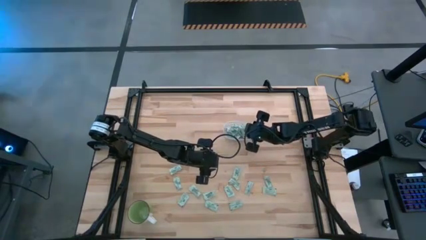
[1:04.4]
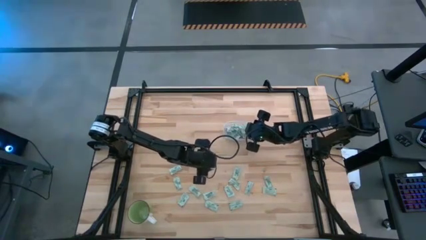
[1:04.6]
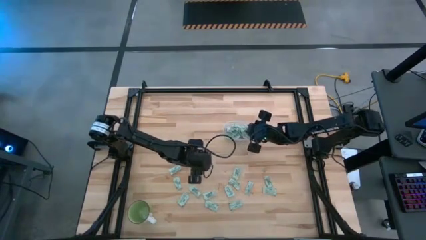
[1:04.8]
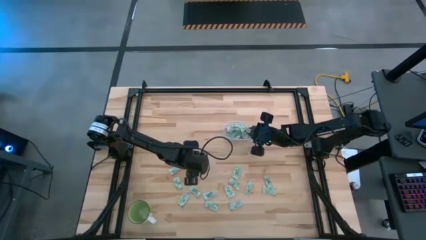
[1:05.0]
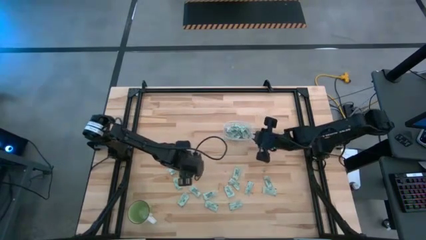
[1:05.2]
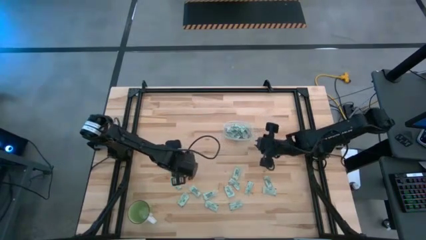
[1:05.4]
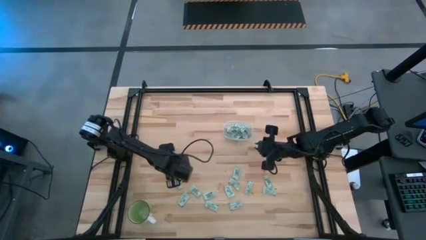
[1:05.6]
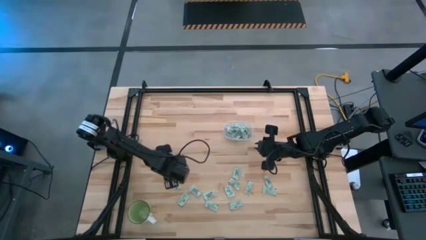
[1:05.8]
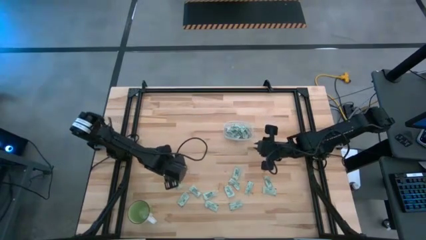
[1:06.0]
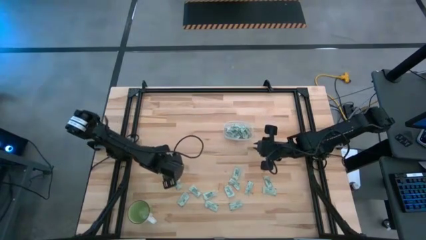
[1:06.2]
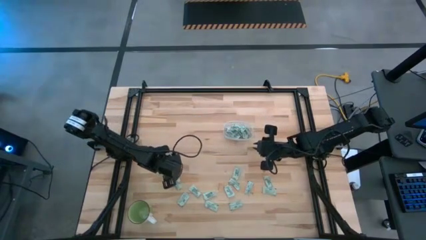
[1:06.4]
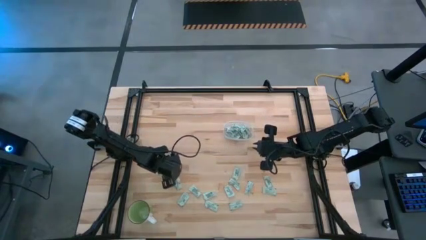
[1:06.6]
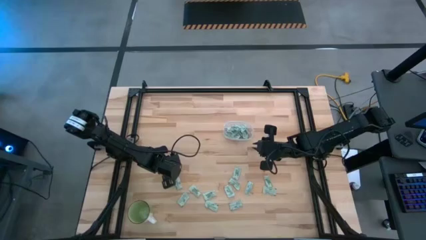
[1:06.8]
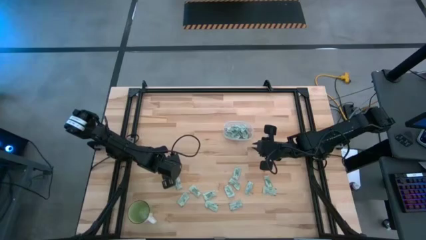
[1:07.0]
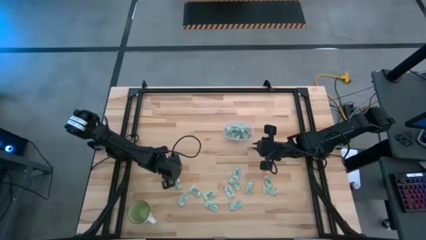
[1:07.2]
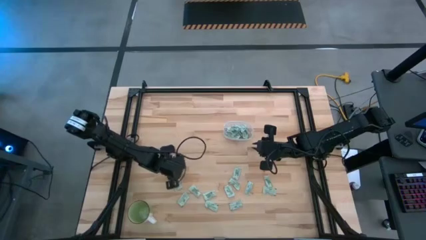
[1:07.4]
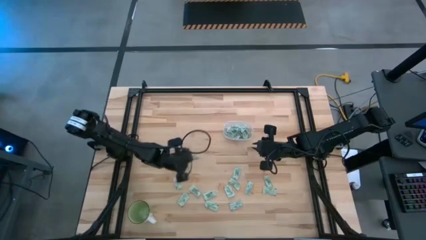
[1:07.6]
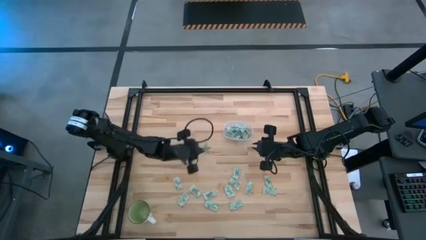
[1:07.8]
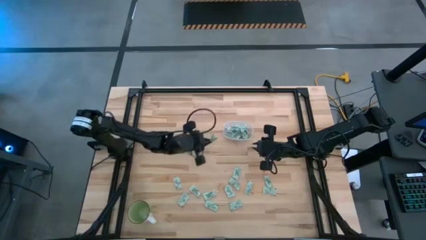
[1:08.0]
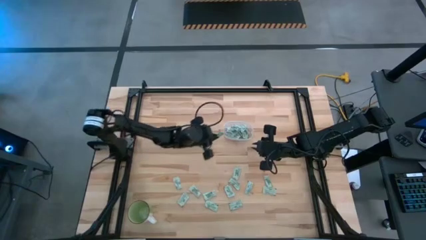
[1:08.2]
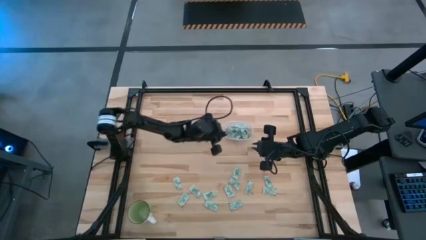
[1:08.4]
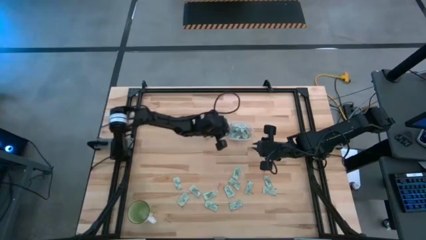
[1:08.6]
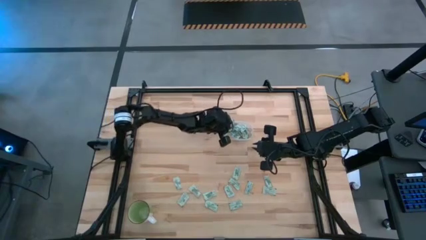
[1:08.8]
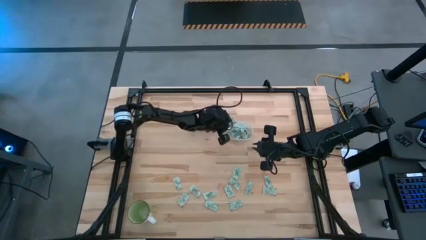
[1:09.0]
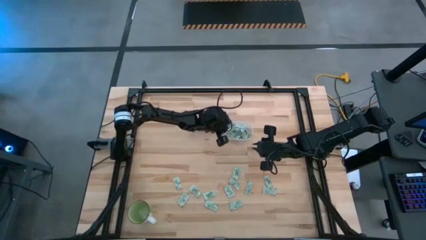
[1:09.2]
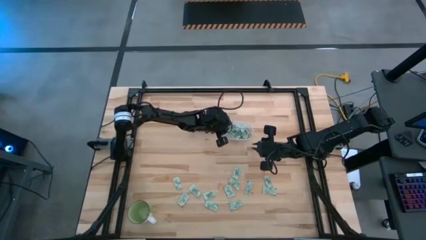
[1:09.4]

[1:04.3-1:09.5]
Task: Pick and place Stevia / Truvia into bins
Put the stevia packet into the transparent bin

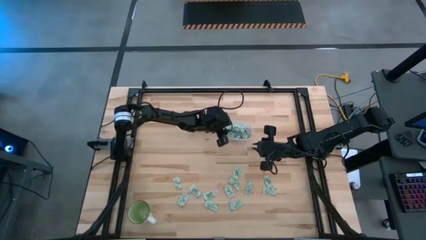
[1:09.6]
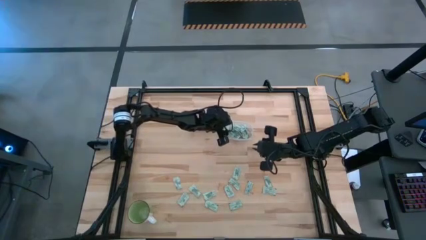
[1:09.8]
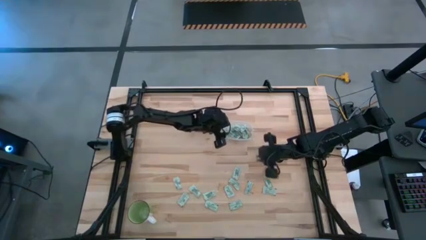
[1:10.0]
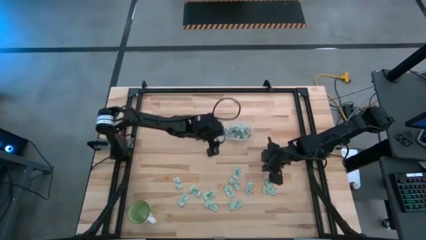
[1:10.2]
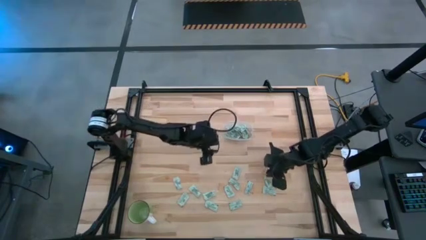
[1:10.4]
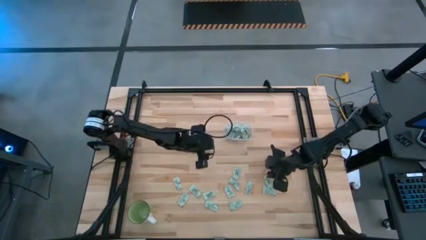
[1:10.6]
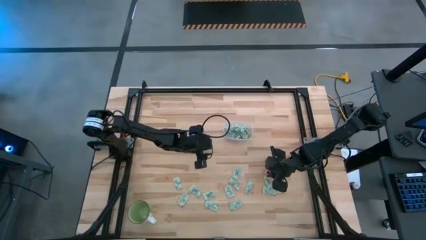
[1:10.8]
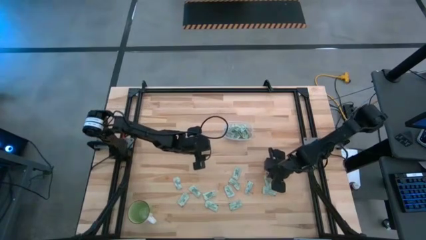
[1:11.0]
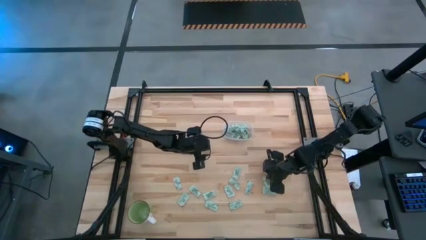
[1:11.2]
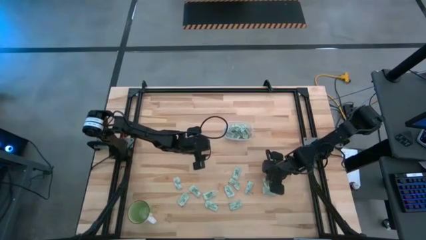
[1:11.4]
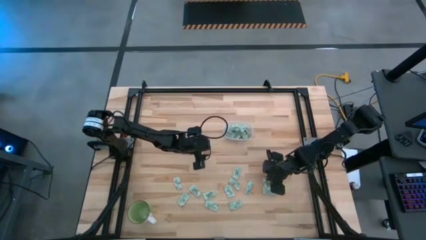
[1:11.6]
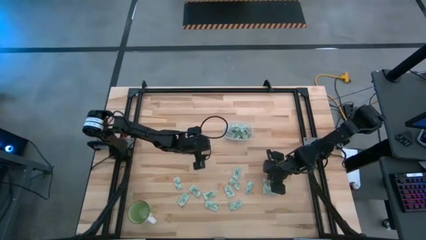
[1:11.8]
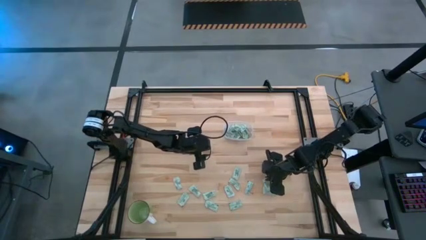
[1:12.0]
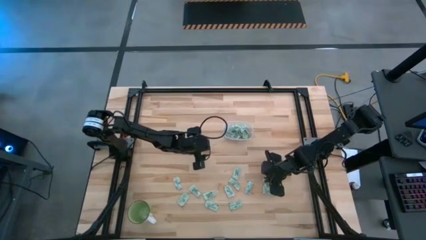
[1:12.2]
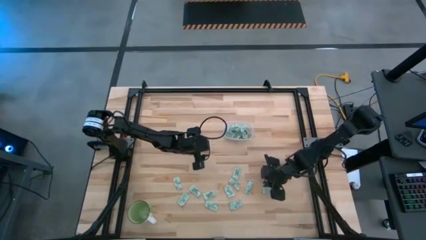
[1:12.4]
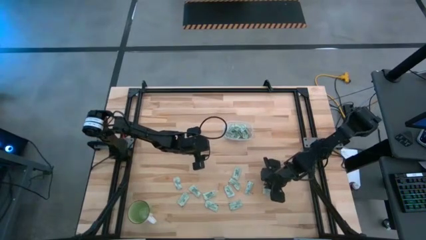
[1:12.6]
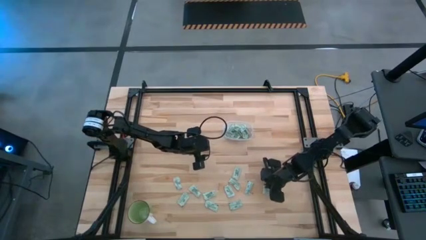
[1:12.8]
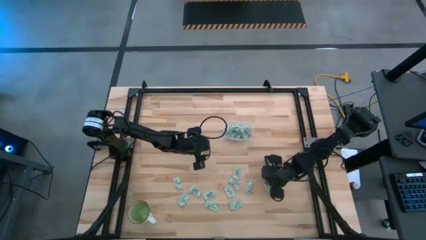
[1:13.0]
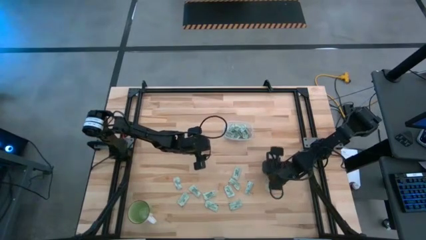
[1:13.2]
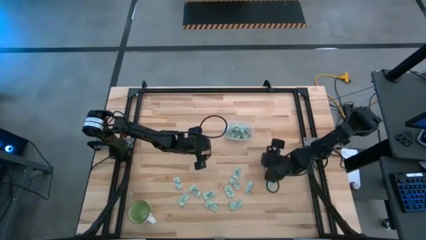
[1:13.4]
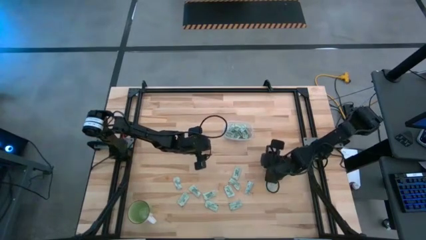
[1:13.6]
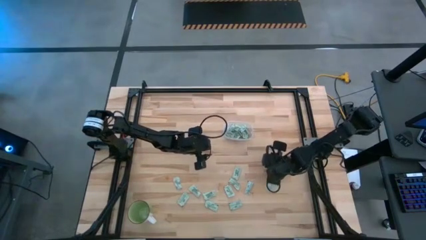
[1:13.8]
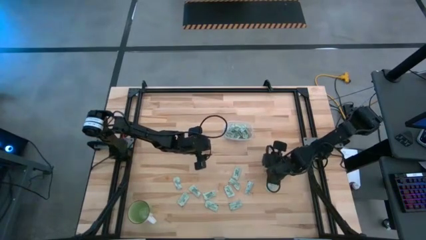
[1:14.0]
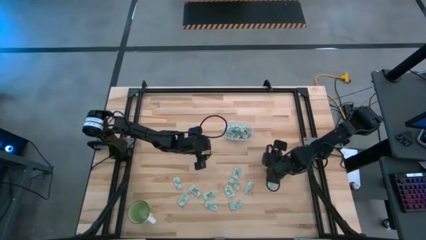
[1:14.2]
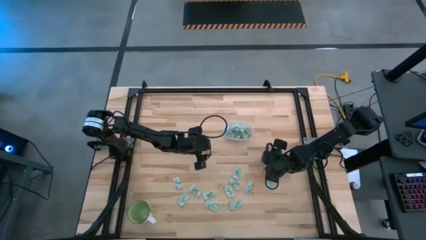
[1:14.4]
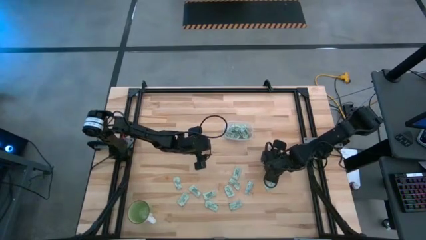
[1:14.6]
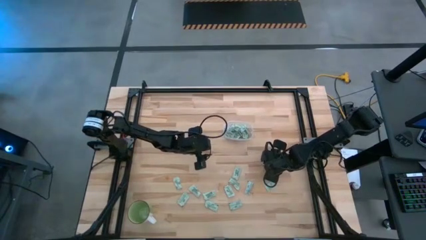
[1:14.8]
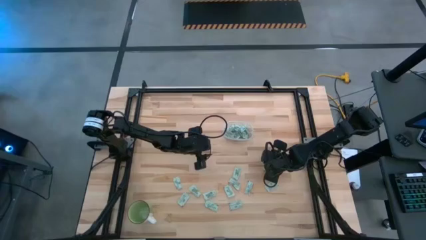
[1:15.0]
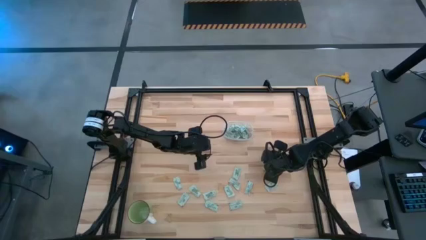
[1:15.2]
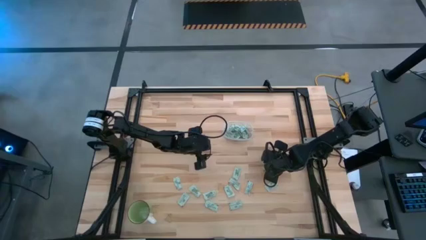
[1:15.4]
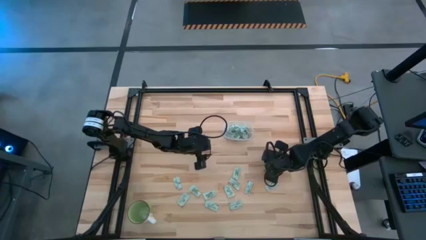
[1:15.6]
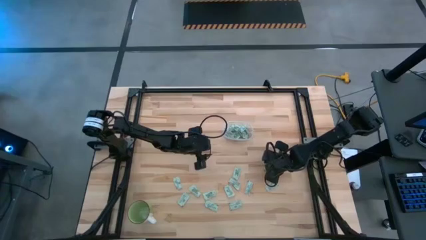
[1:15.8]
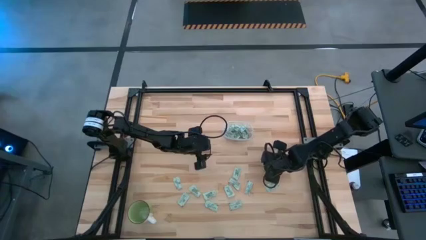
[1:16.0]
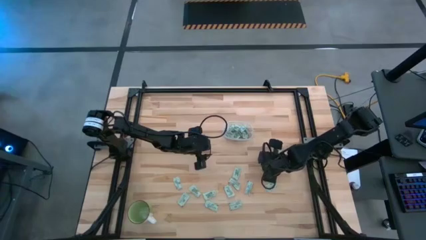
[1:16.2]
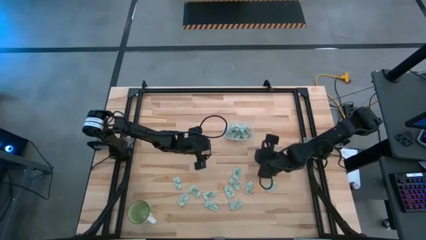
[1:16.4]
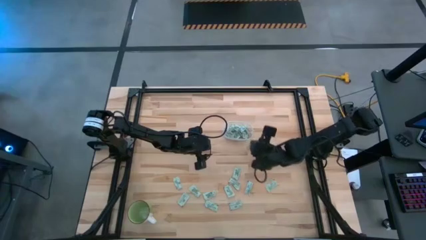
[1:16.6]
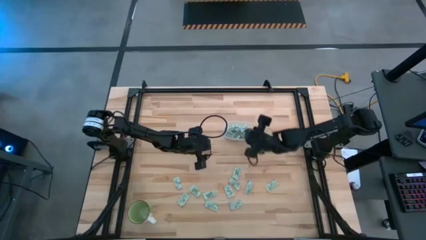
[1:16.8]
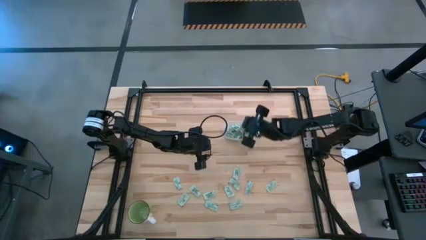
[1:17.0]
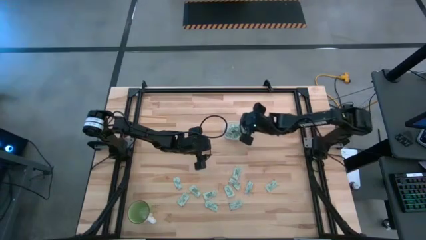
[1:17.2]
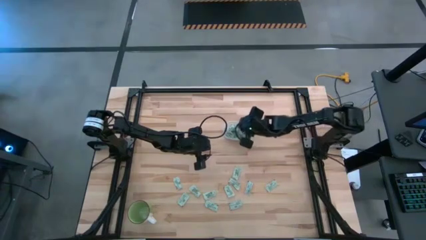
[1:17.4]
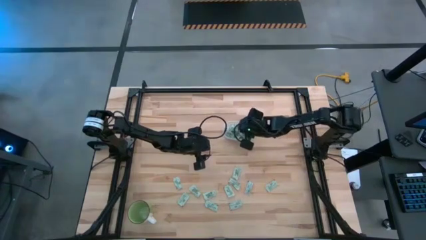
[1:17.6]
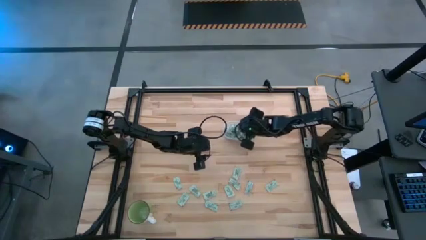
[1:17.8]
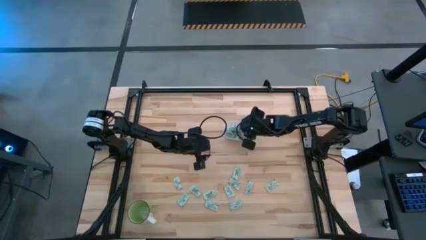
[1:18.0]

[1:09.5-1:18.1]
Put the stevia packet into the transparent bin

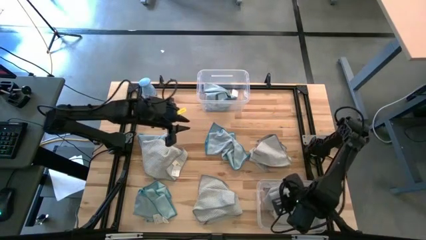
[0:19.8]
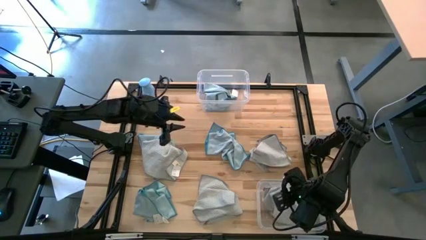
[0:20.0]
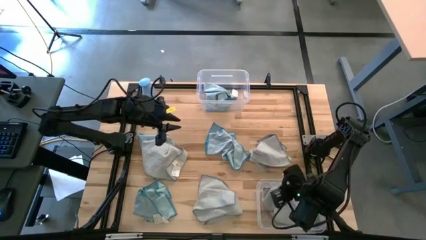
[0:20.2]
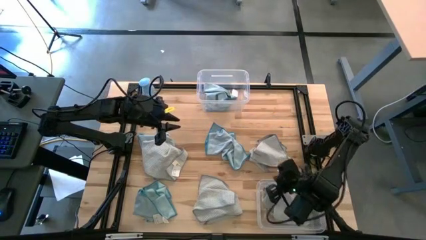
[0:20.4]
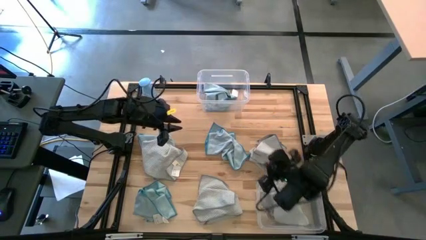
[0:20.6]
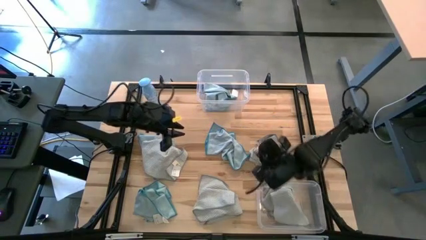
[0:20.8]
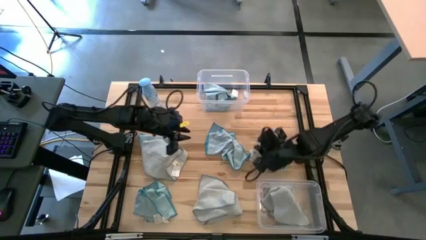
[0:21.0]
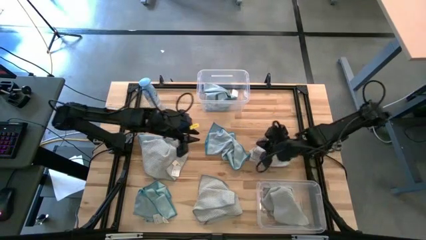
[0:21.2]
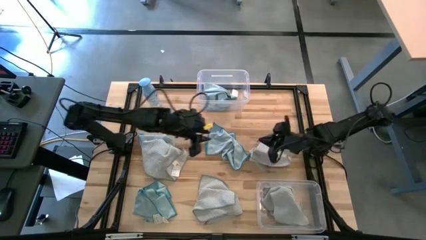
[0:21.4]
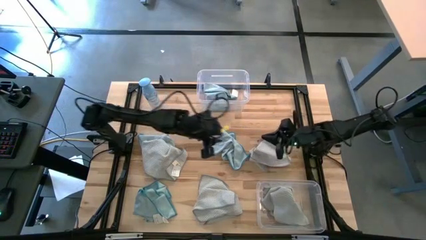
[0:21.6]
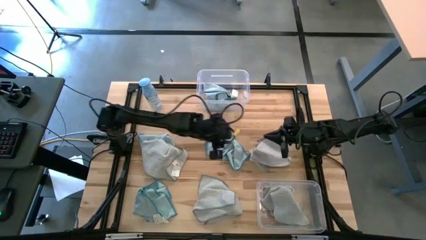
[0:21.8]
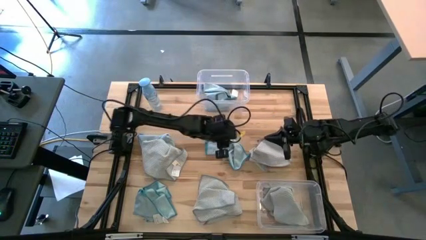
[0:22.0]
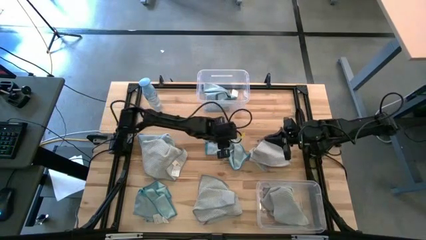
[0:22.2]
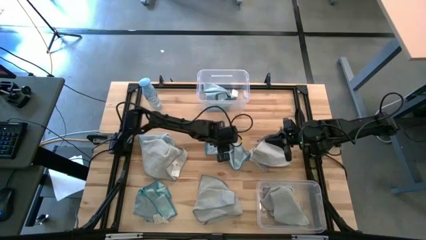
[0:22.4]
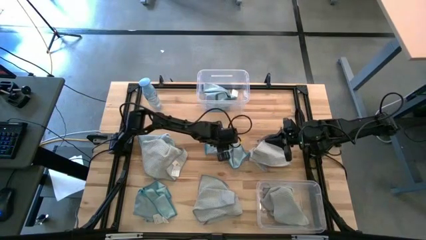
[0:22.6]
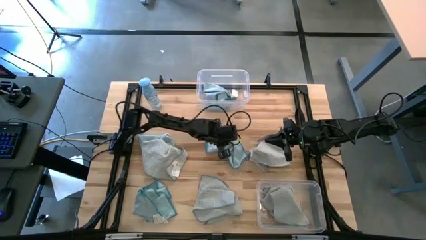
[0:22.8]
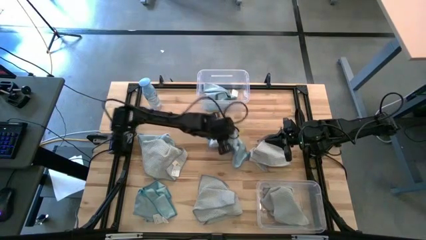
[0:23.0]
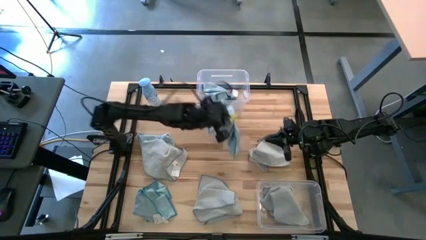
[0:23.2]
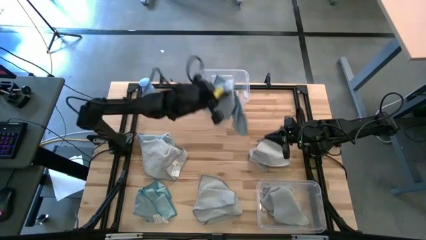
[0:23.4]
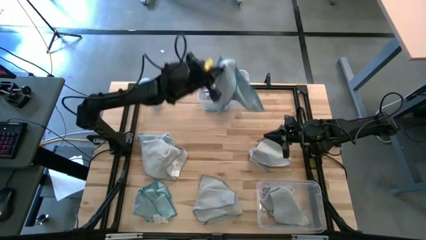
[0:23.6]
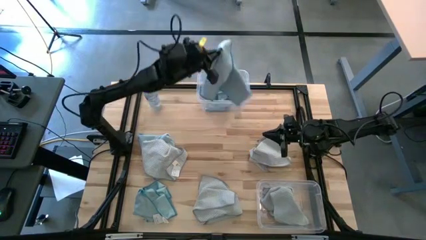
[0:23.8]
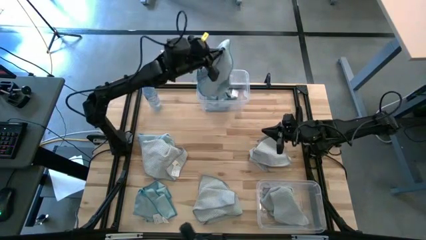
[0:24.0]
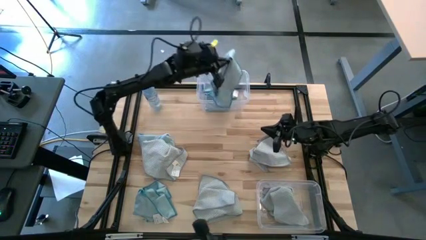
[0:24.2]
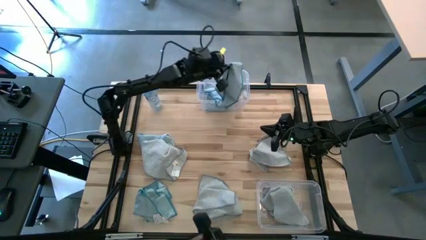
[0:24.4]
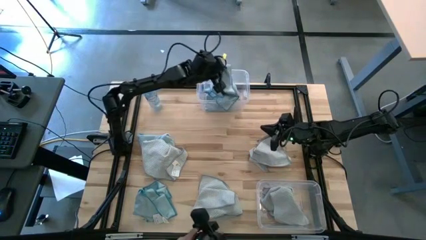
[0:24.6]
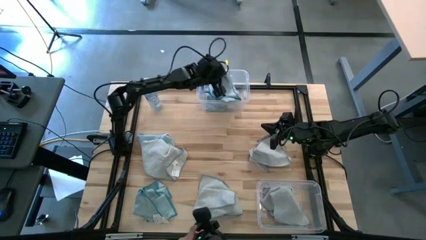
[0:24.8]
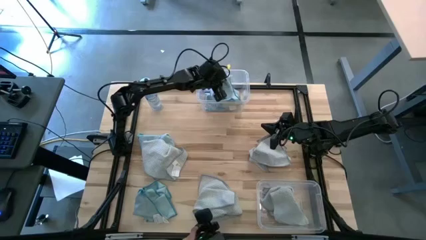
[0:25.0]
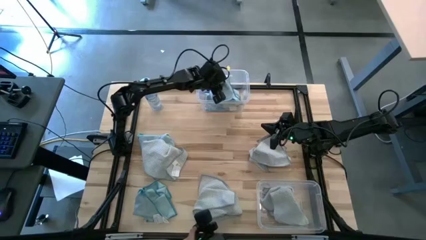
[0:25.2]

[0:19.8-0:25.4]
Task: Sort microfiber towel by color & place in baskets
Put the blue towel into the top transparent bin
